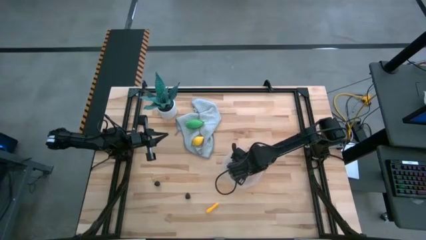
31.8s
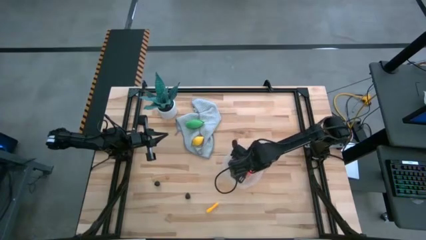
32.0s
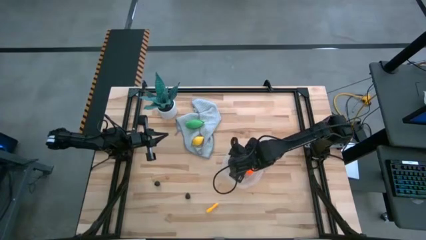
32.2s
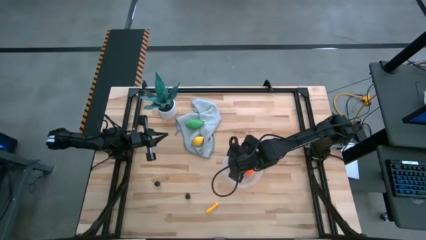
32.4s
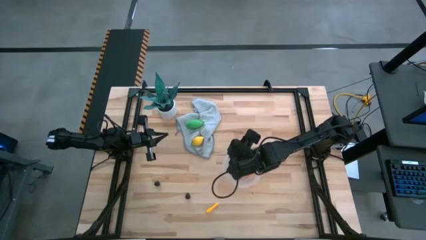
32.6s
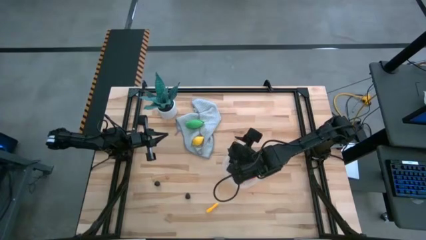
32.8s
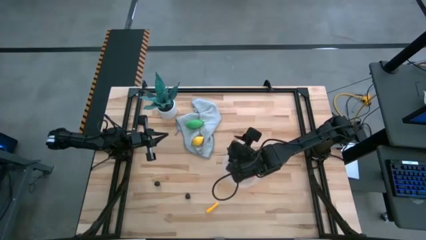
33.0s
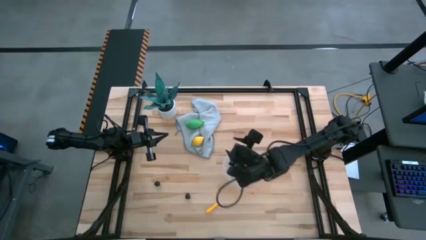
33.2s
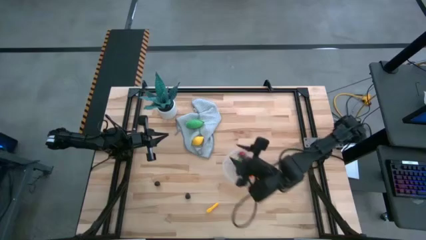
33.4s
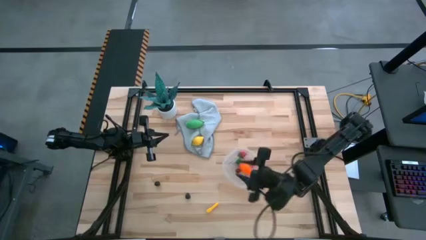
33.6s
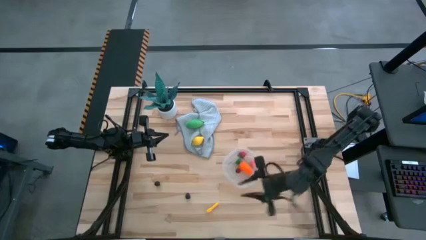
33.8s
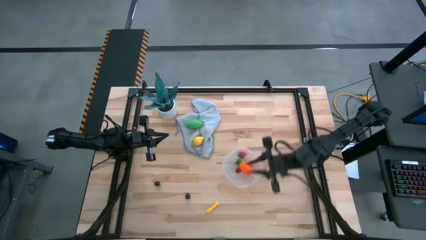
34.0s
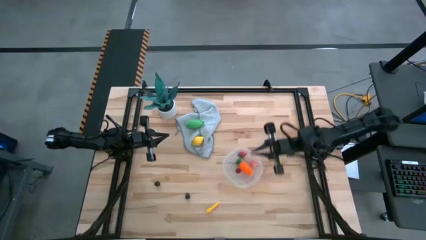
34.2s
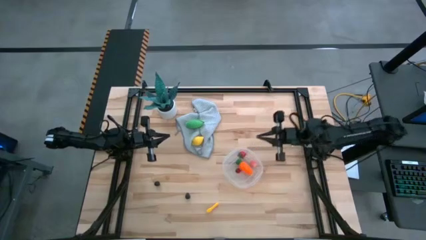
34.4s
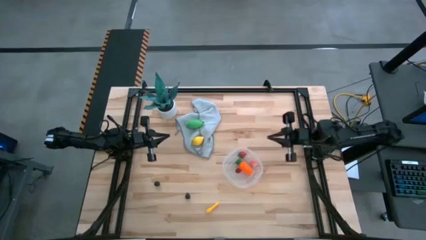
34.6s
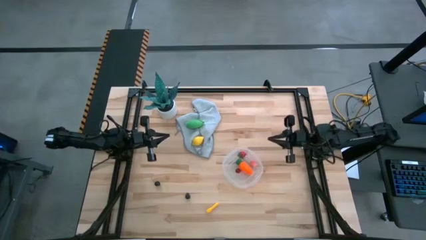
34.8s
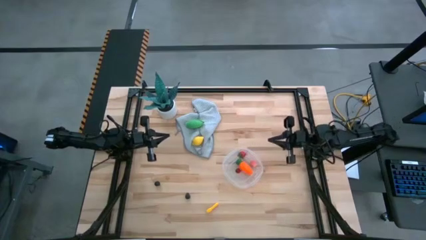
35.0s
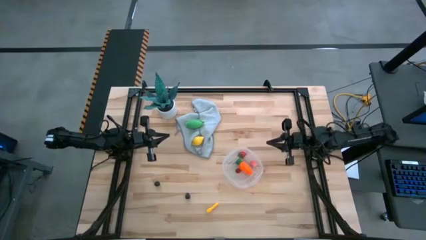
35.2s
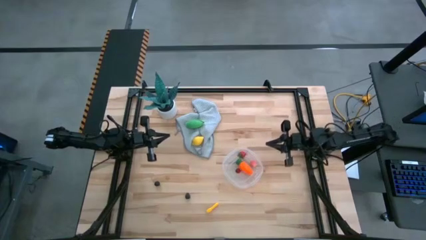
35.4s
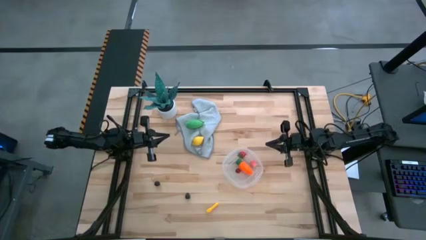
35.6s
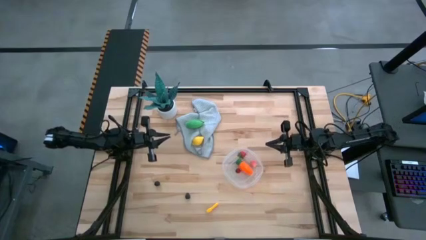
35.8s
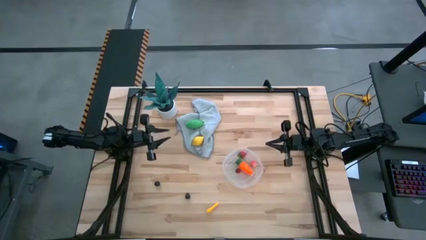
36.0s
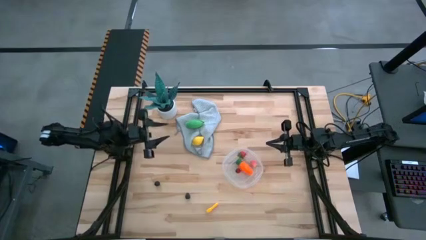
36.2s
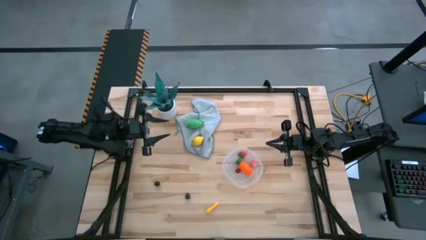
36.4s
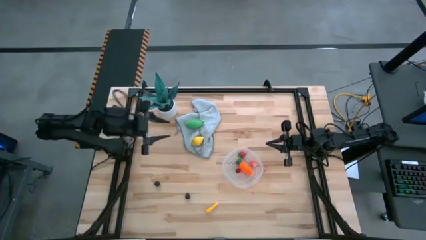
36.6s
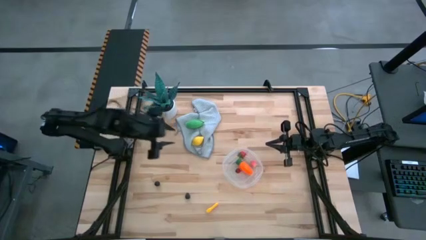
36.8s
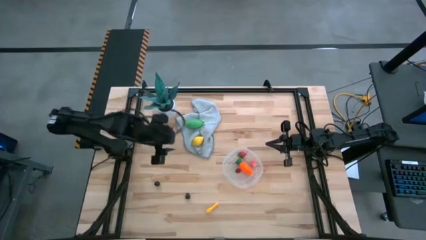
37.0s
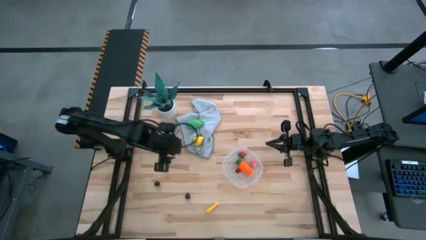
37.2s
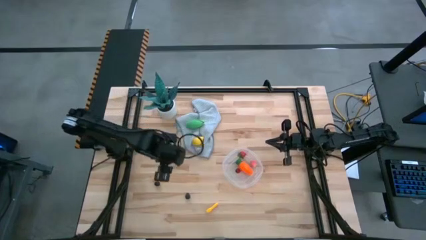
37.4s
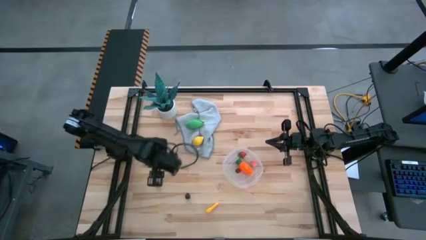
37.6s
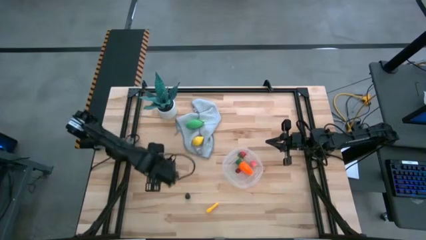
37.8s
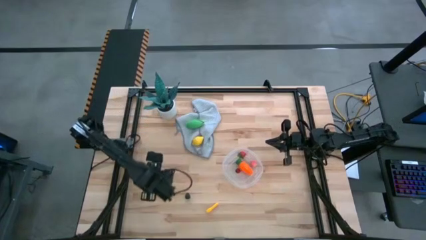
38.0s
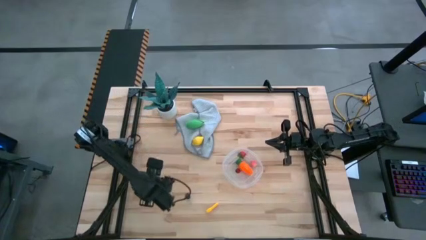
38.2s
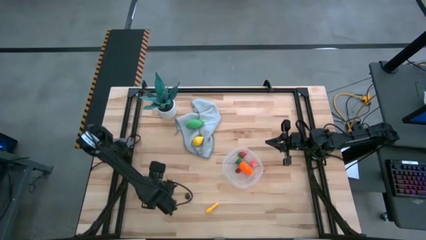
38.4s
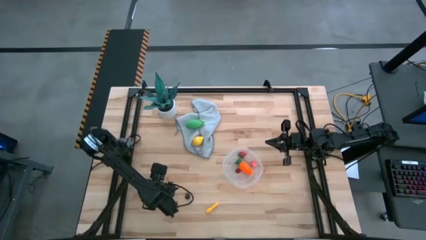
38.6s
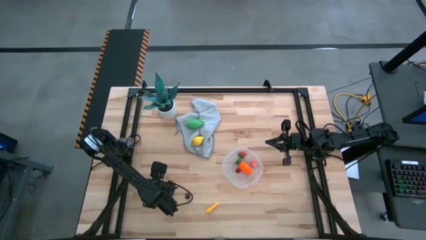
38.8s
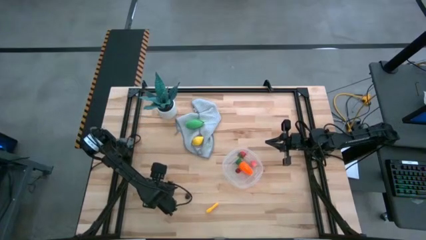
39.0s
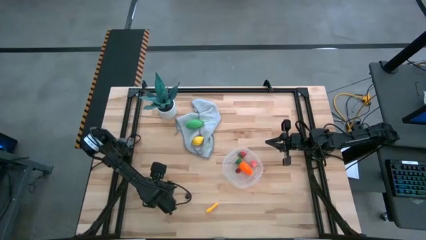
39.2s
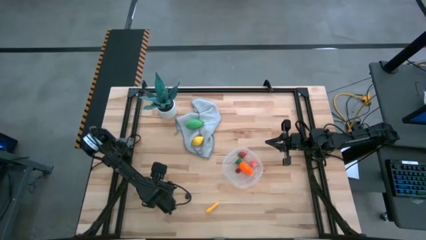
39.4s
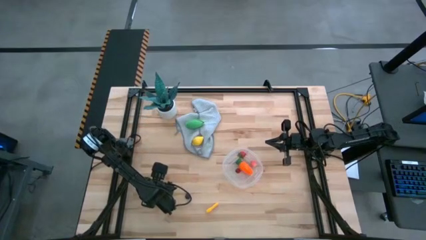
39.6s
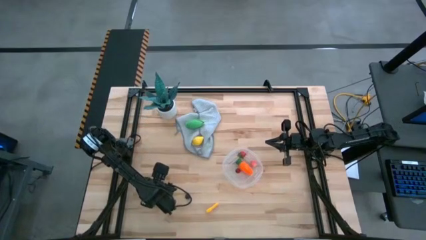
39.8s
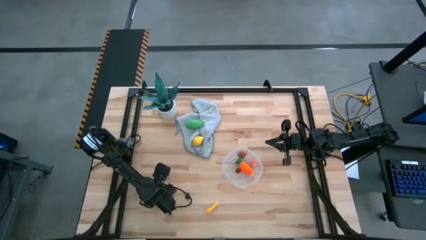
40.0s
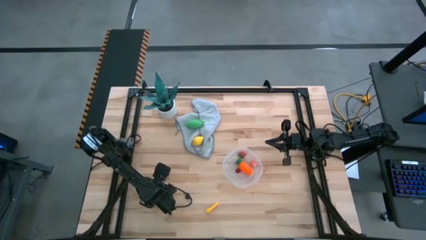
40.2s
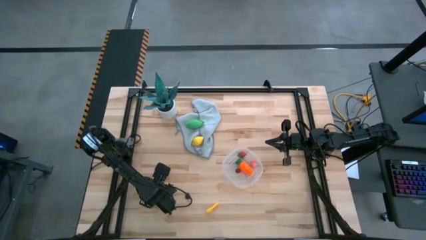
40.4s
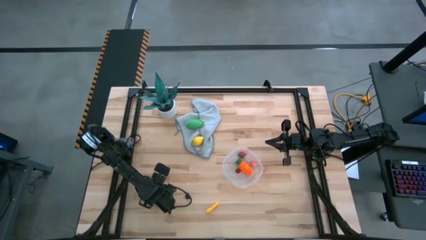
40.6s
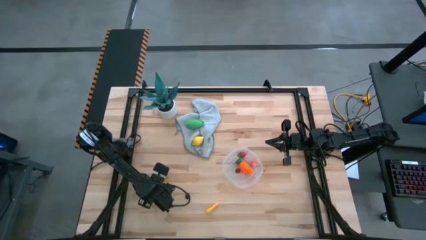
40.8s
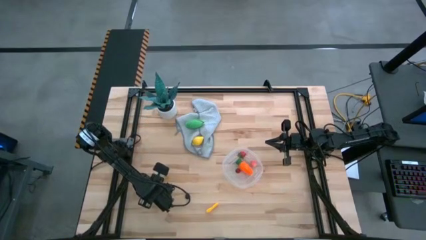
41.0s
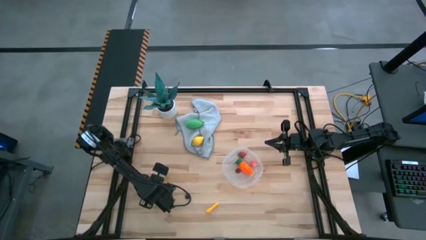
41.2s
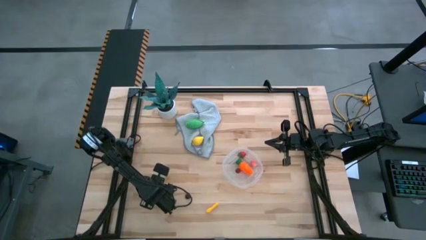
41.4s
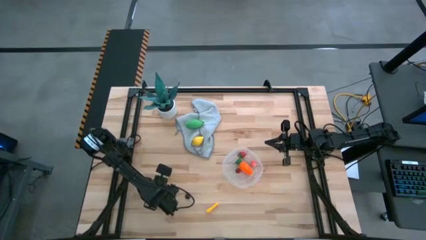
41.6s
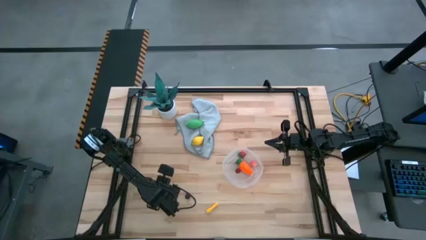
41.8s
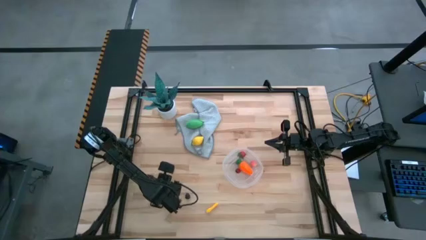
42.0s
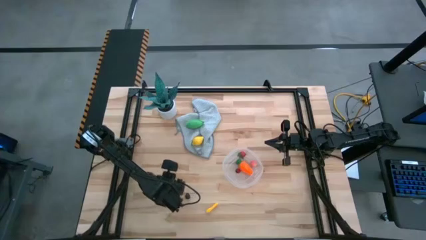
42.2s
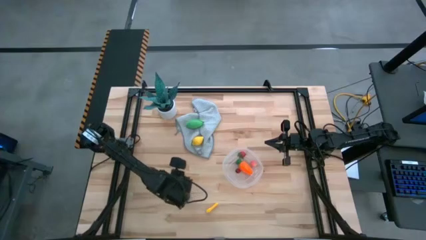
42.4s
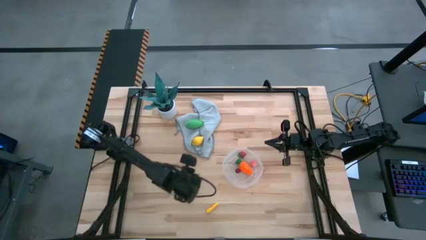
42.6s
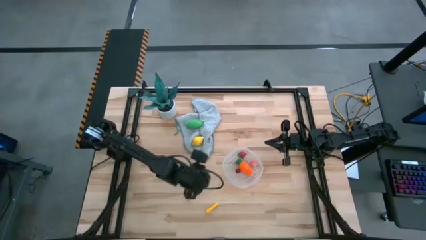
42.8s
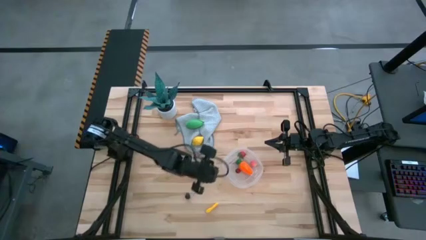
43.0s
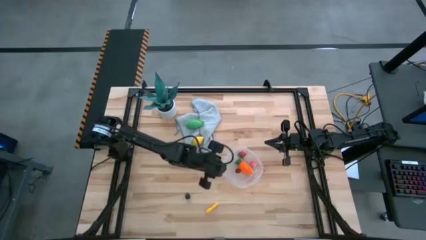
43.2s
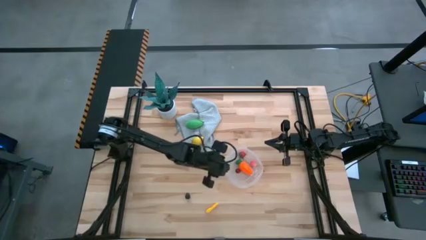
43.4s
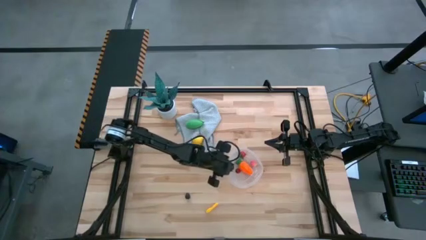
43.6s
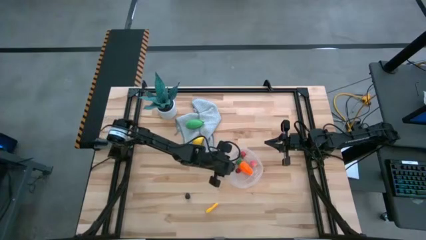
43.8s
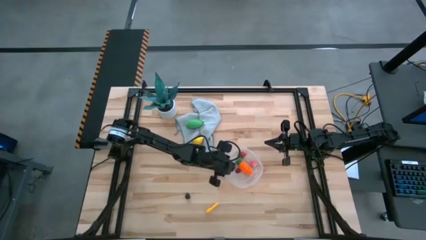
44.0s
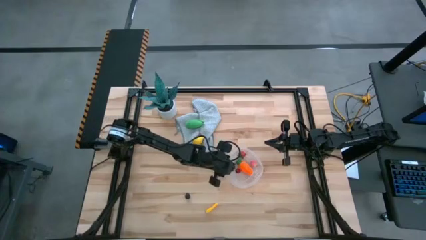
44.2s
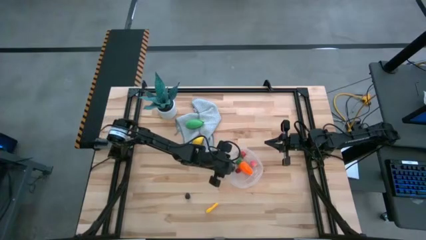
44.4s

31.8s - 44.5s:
Task: Pick and placing Produce into tupperware
Put the black cherry into the transparent bin

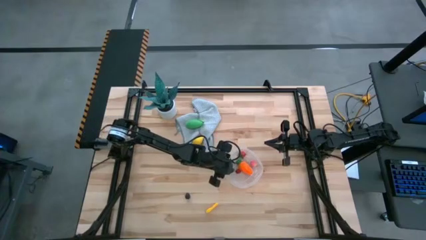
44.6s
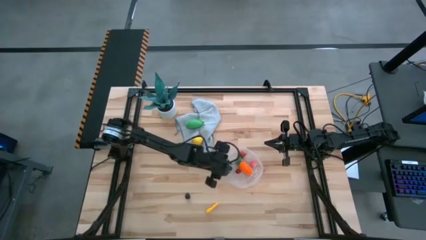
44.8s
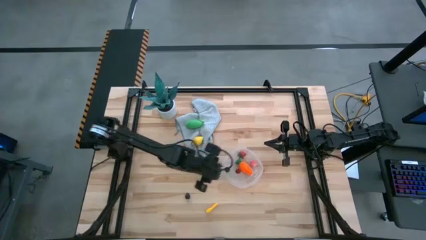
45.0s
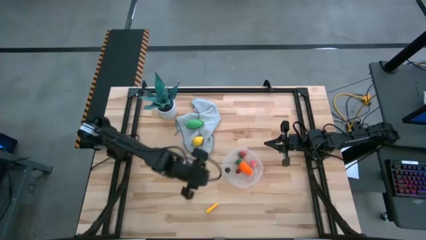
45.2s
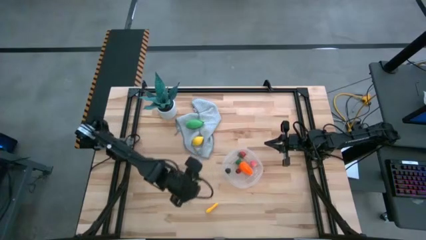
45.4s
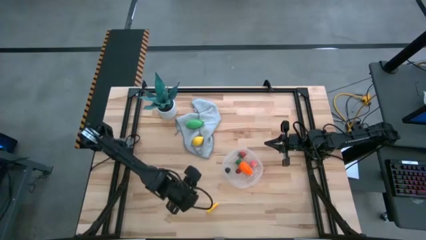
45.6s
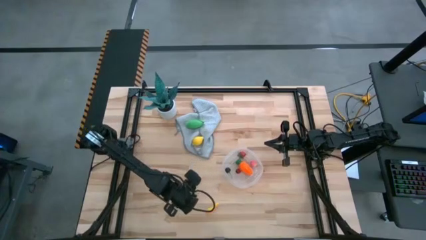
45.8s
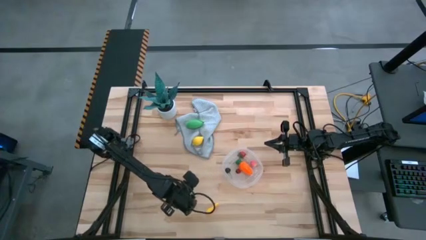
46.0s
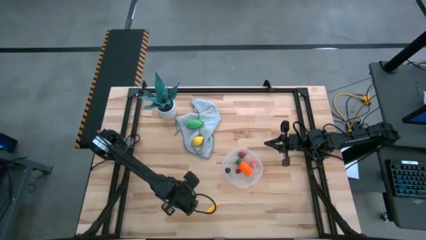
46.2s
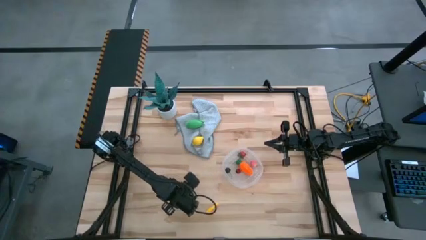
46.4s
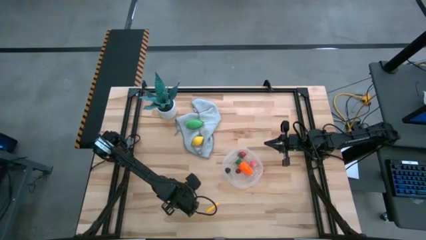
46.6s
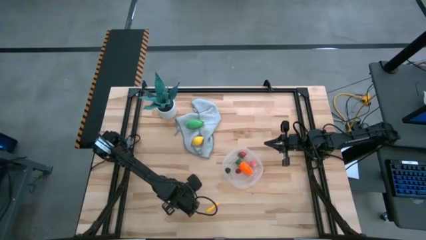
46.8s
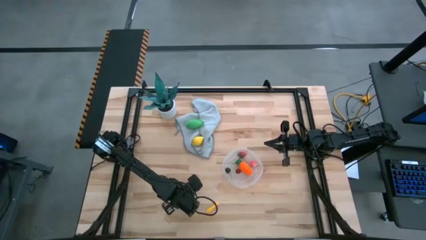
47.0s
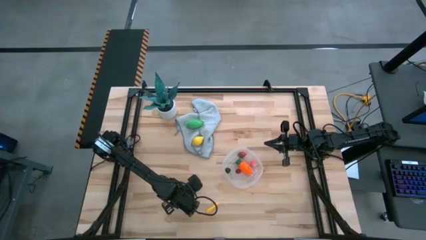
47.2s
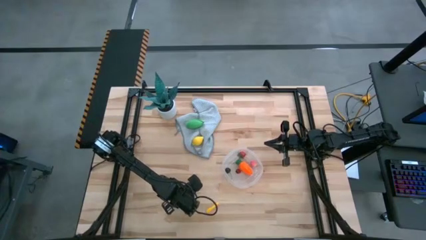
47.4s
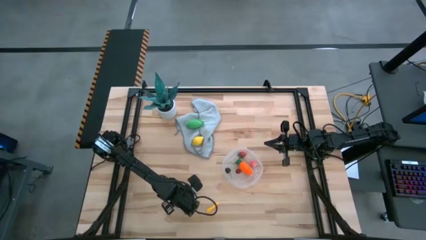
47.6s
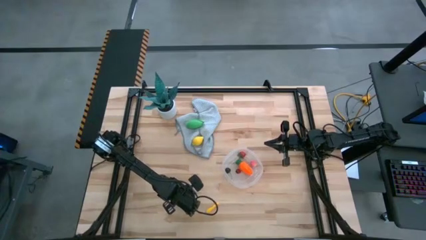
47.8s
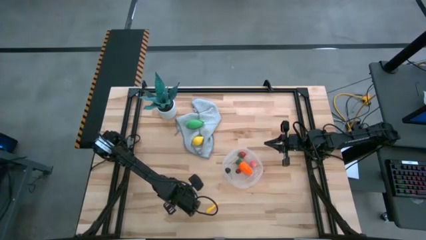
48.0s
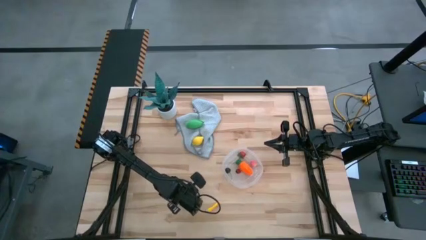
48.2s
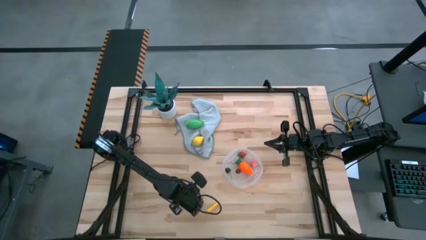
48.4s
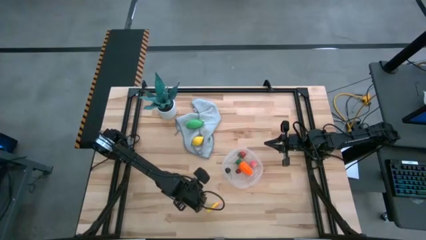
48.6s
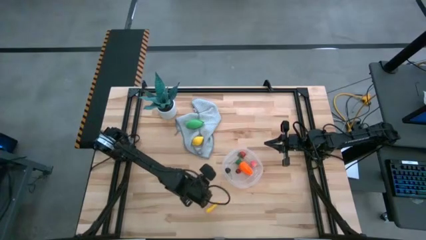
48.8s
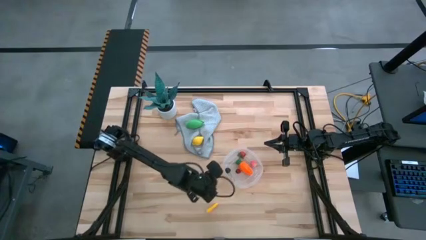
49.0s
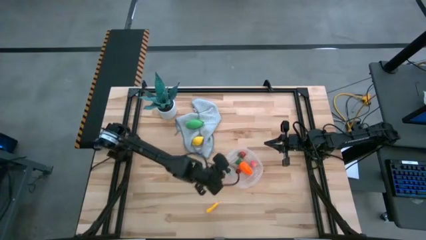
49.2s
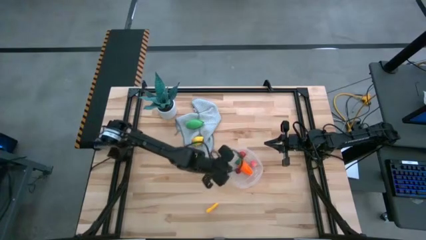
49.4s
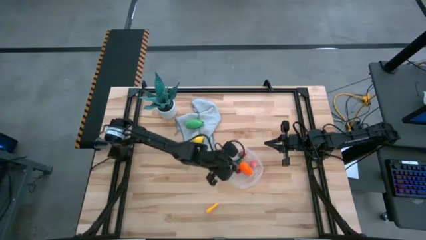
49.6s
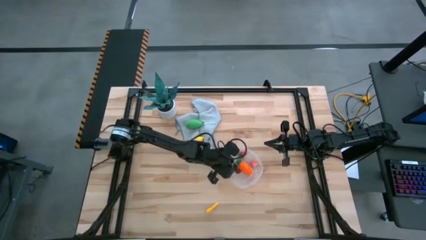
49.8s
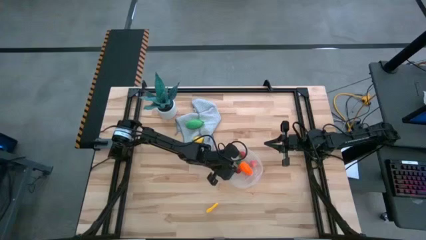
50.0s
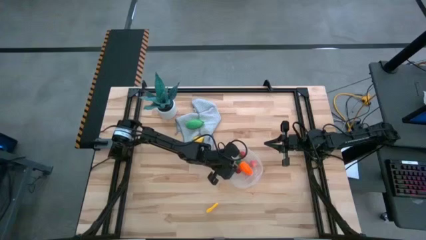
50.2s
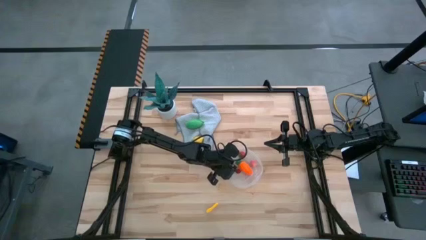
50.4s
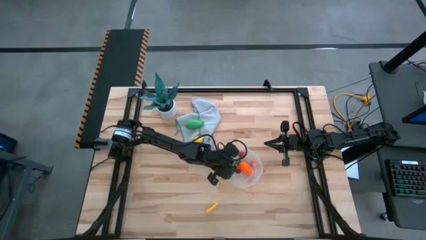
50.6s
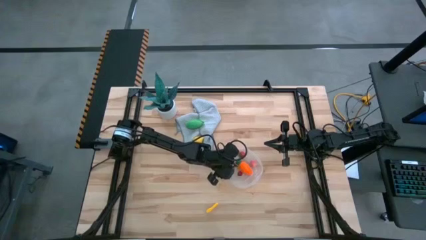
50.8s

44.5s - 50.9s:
Put the blackberry into the transparent bin
